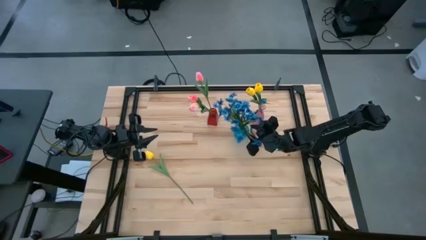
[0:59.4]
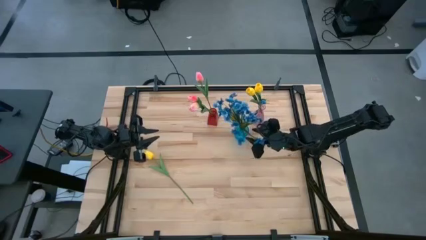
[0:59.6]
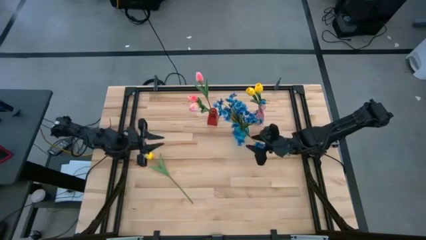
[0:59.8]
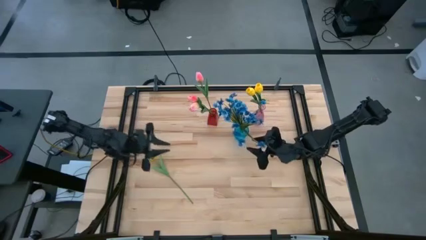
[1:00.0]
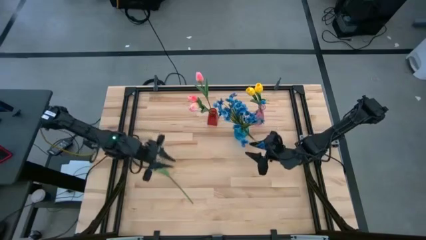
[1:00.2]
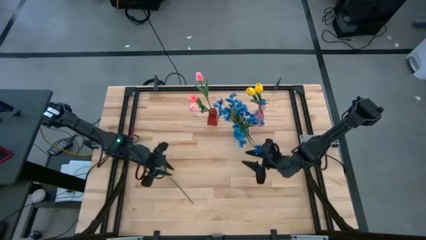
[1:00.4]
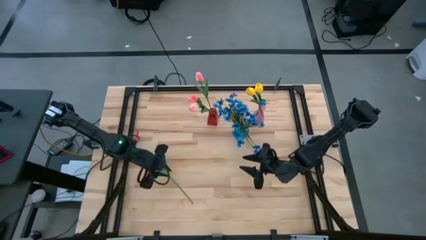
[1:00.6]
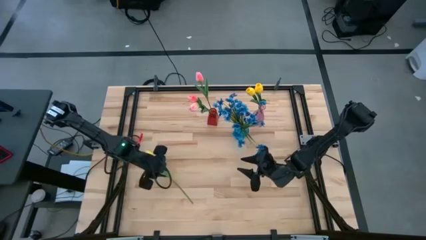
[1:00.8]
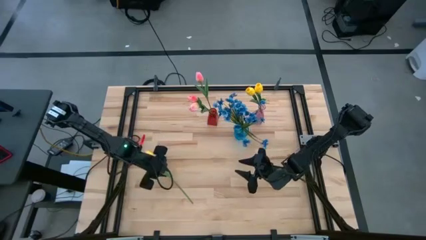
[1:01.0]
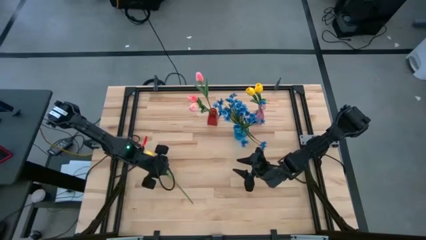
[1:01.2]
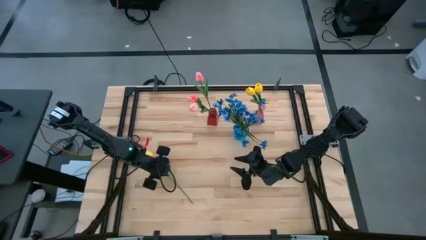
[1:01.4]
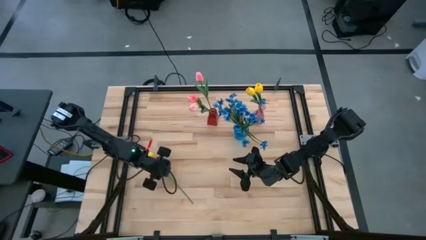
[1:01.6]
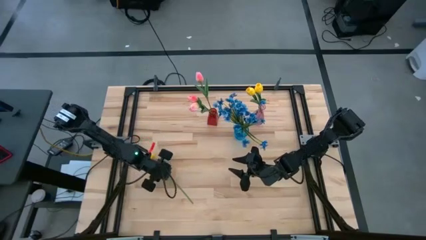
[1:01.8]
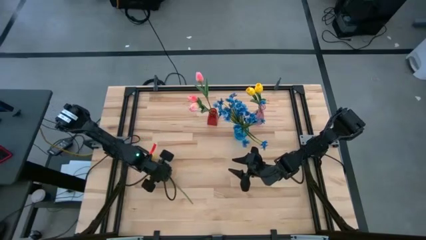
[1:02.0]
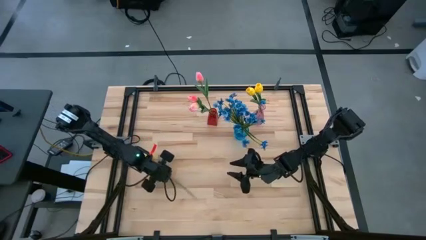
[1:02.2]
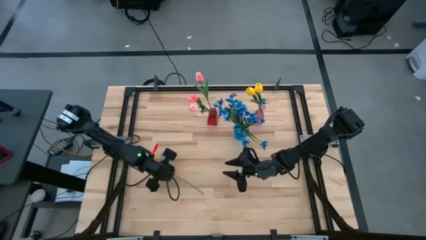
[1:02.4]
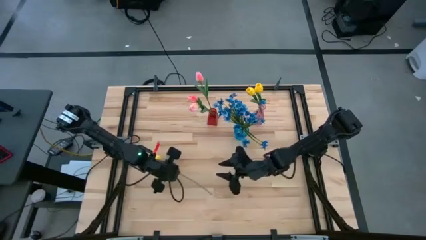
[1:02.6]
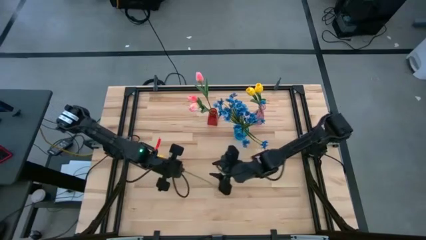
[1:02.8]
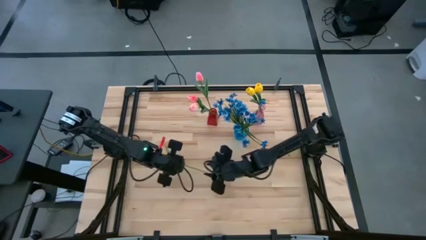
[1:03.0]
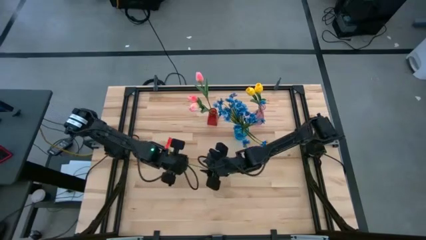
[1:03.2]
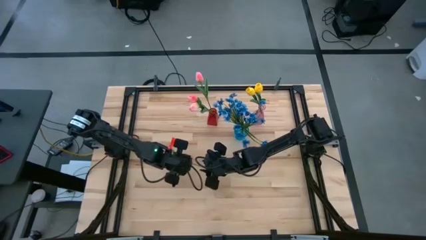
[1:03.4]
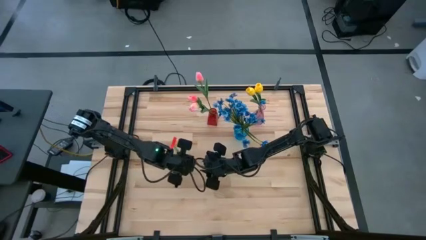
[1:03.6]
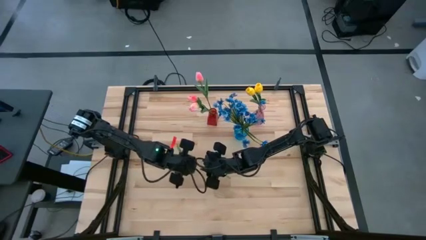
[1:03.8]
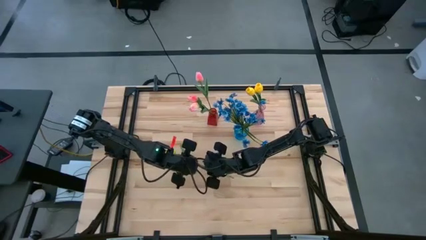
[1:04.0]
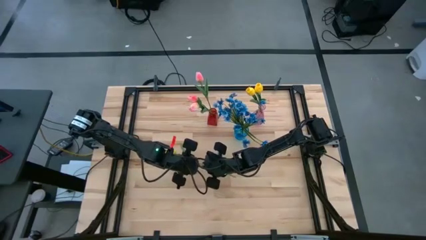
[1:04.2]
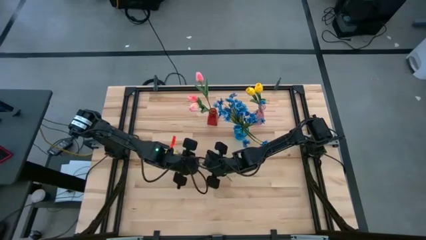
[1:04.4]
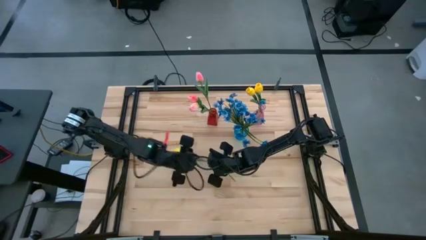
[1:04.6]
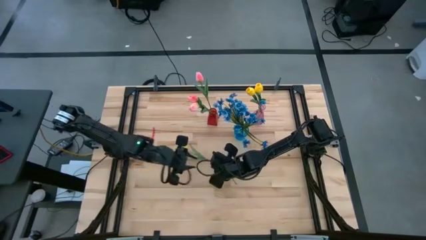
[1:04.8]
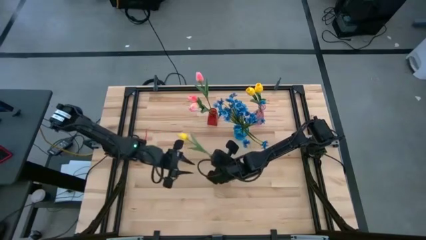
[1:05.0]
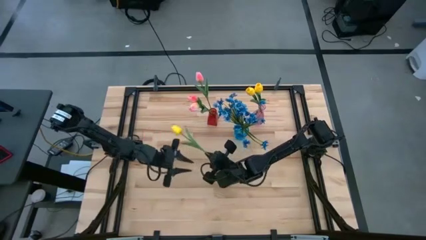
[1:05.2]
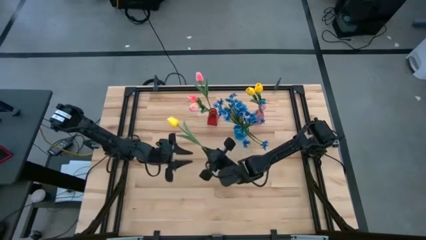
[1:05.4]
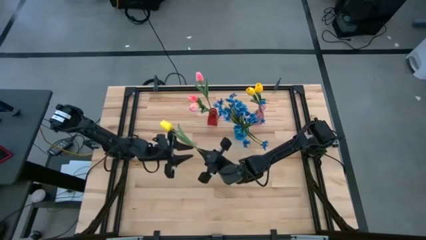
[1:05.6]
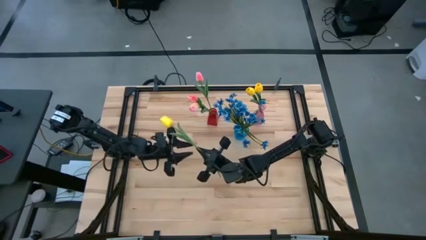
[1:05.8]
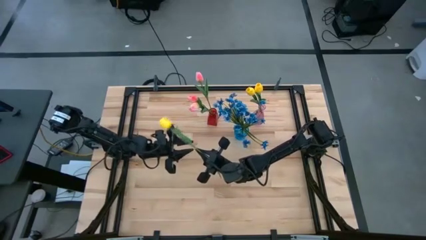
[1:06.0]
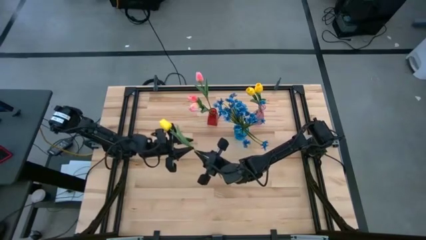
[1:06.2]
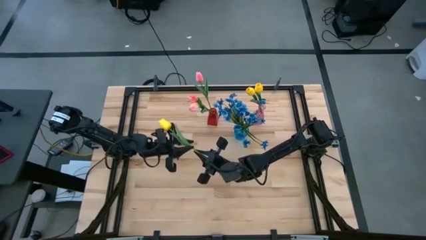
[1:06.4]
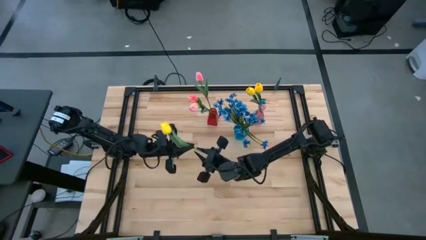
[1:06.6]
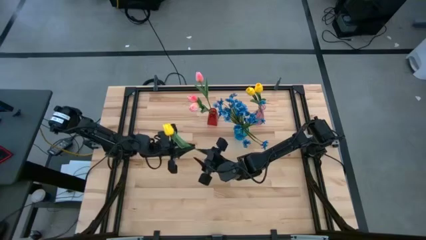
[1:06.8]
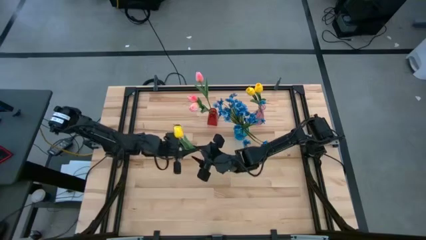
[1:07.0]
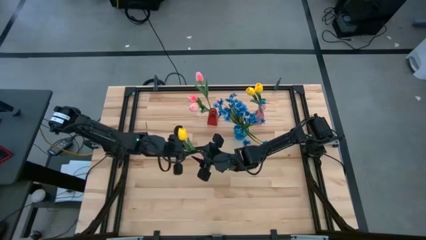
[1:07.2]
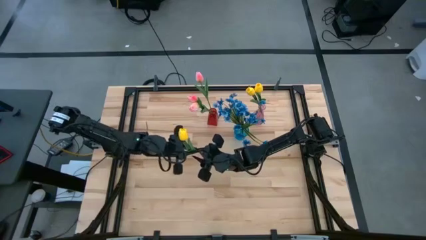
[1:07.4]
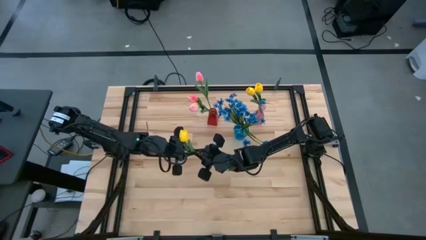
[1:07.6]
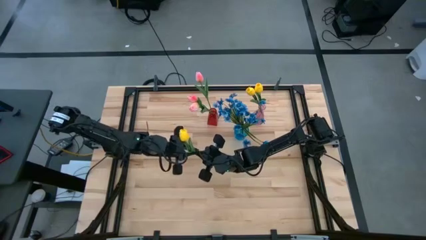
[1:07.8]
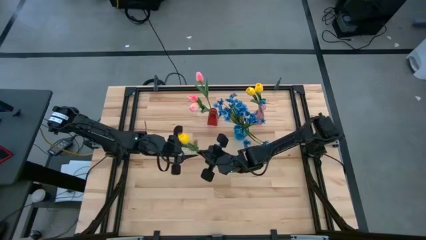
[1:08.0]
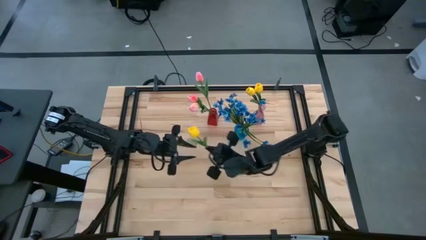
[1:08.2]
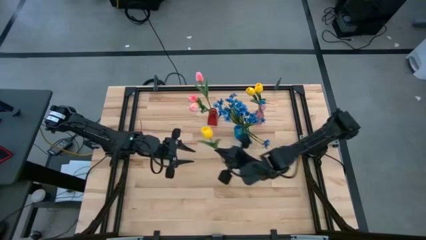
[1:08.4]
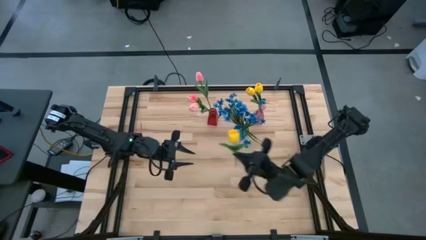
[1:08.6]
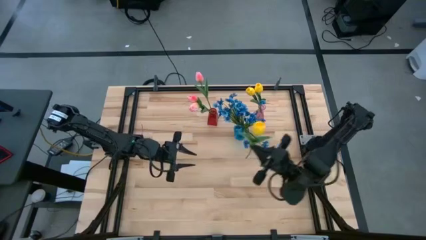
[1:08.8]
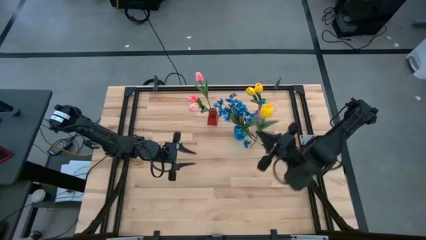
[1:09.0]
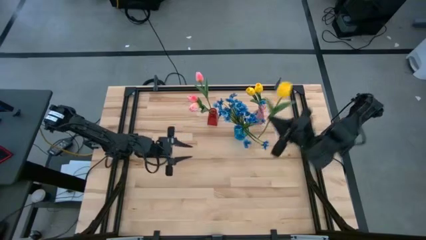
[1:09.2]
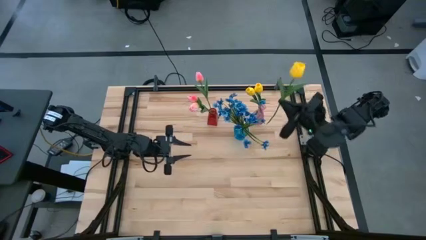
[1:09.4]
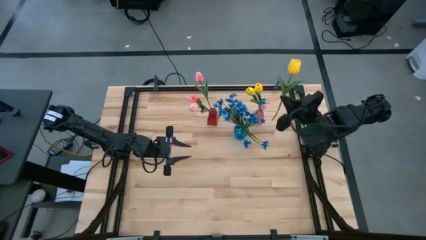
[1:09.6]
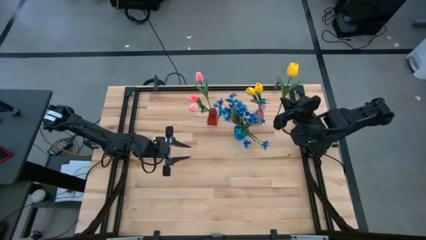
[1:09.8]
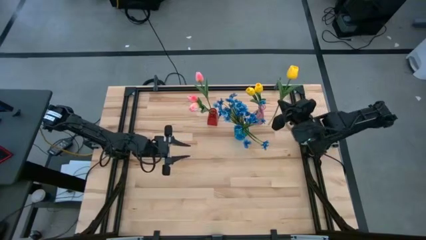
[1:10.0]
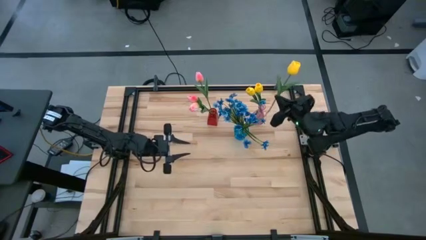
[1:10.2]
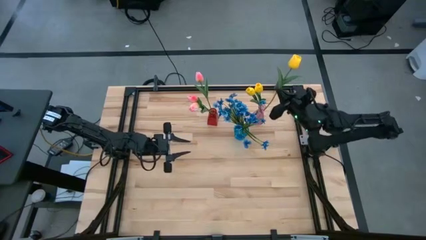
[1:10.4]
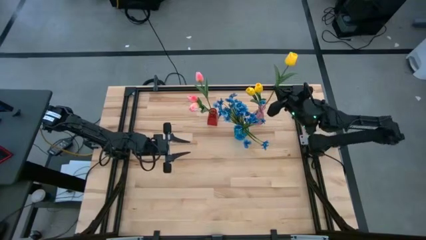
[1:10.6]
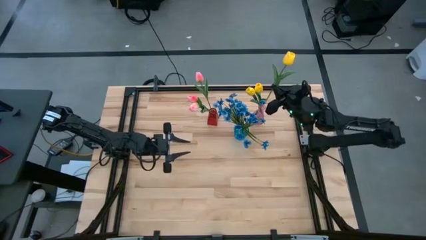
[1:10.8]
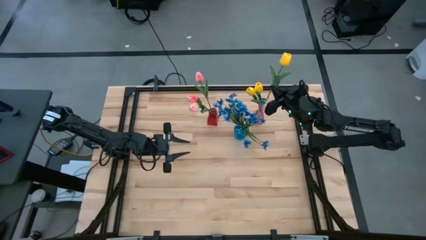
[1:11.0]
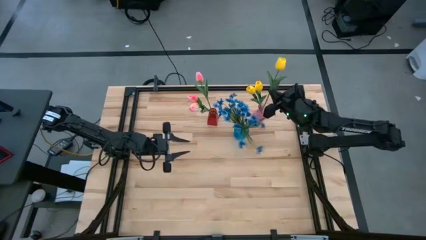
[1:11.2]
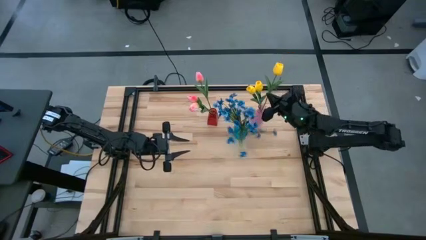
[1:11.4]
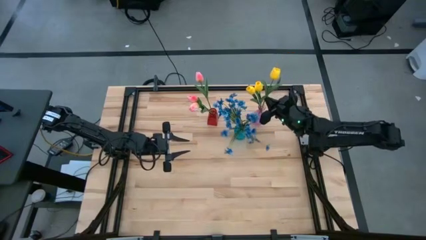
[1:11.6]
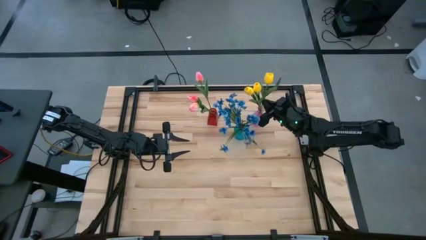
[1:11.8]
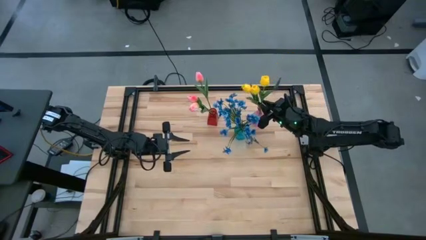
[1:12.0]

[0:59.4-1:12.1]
Task: Sort flowers into vase by color
Put the yellow tulip into the pink vase

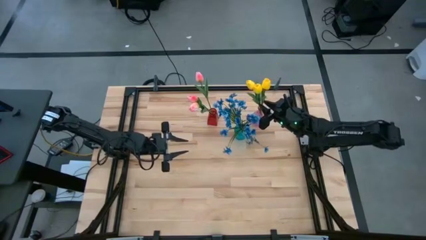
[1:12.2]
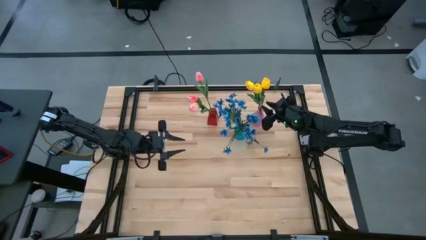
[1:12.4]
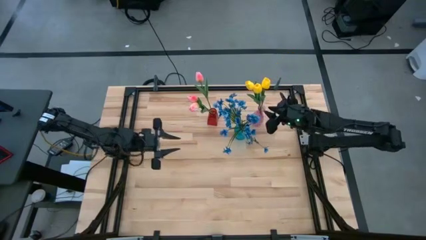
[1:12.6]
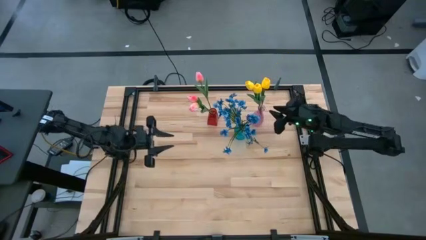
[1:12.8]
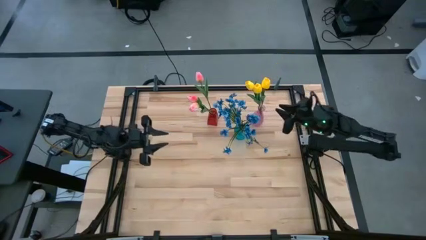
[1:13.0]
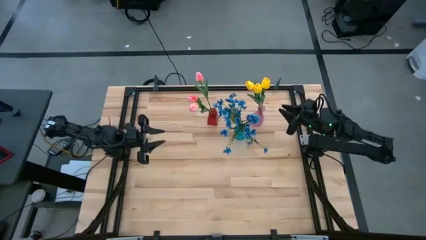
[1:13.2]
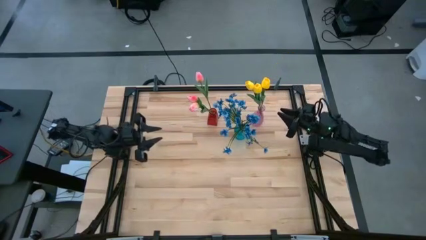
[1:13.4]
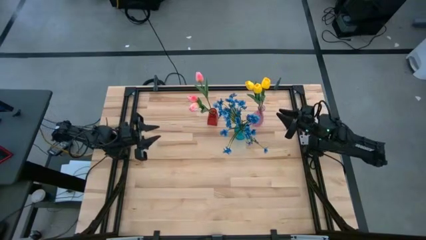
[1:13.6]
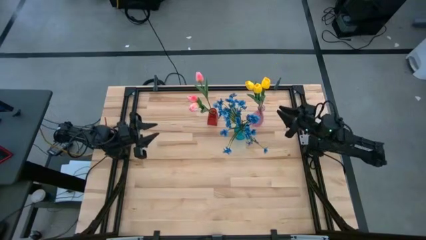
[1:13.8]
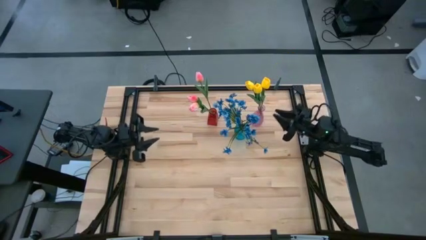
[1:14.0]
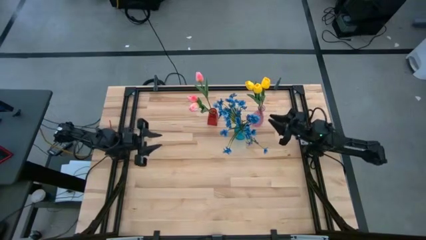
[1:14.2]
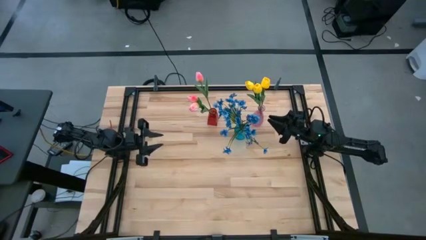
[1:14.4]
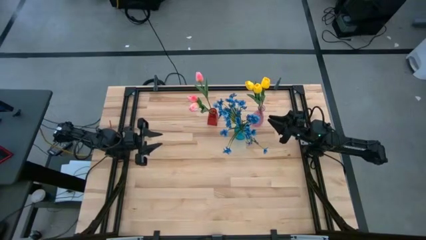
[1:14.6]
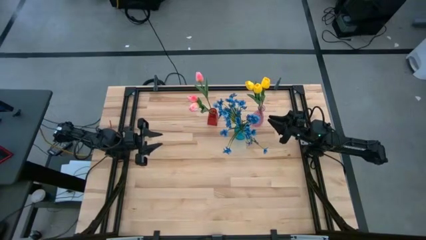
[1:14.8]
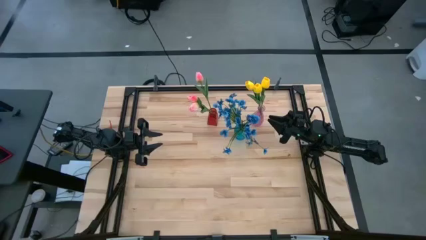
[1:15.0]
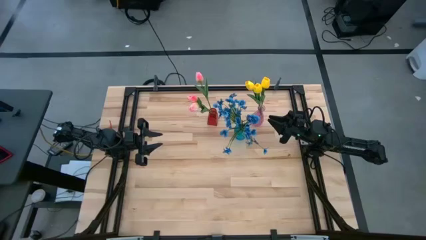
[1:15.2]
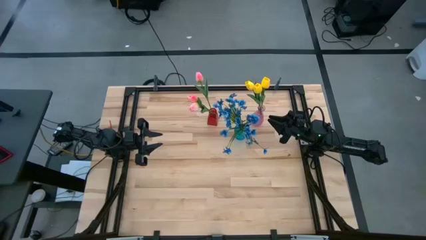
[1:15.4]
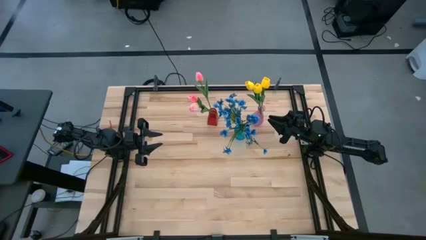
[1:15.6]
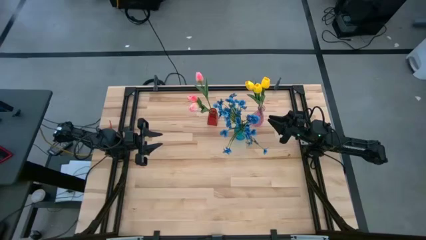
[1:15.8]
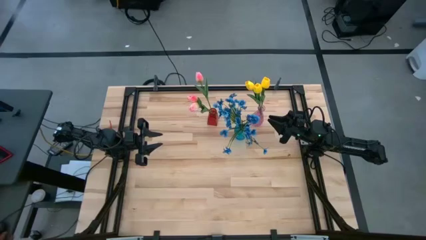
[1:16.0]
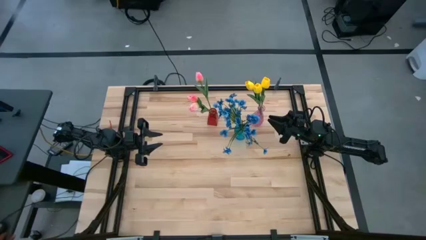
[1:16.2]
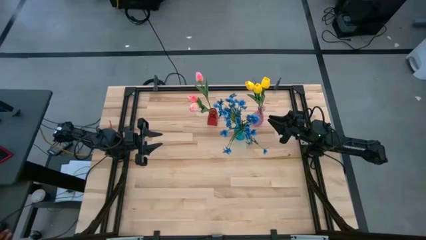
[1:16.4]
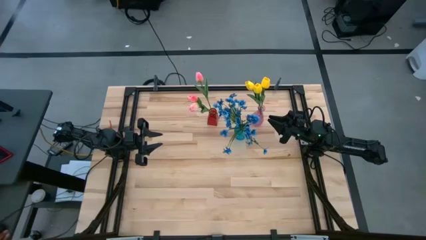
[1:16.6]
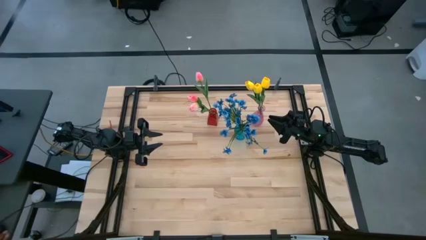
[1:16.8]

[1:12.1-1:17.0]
Return to Home Position

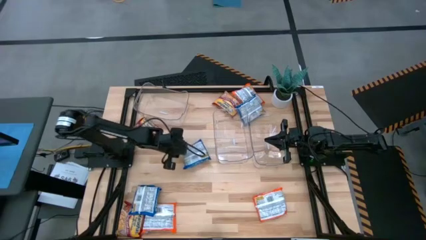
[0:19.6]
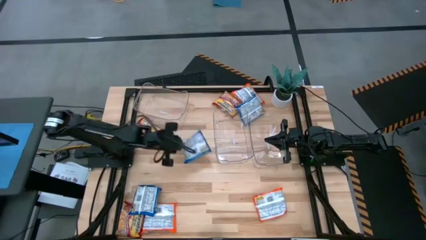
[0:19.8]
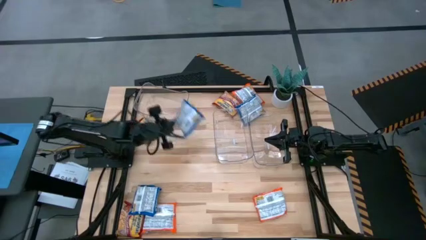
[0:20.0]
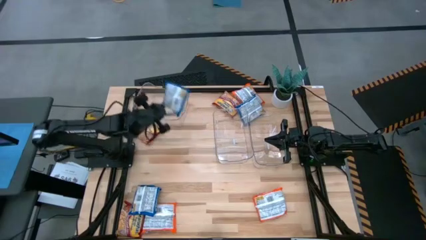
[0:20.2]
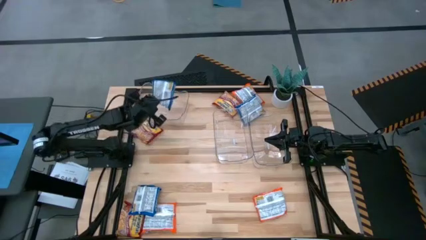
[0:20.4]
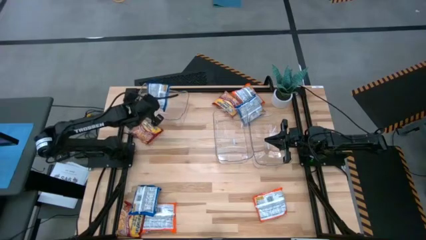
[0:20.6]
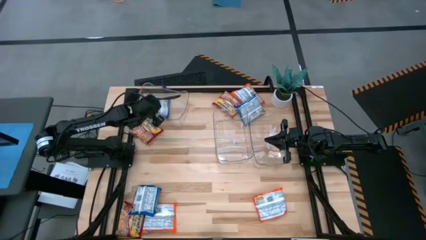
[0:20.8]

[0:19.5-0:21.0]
Task: Sort Maruchan noodles
Put the middle left blue noodle pack into the top left transparent bin
